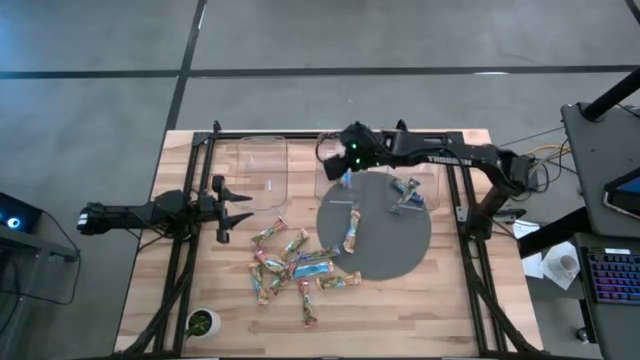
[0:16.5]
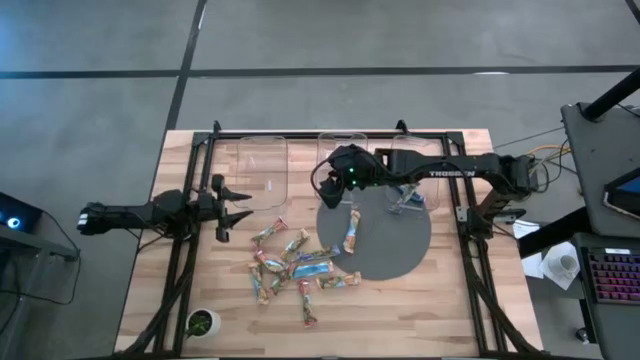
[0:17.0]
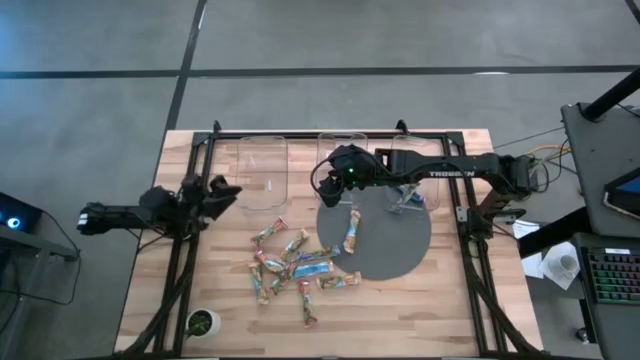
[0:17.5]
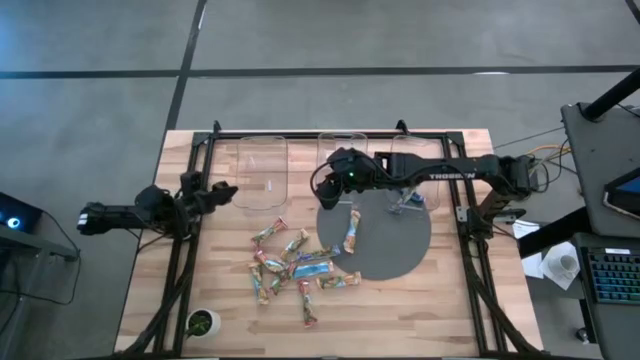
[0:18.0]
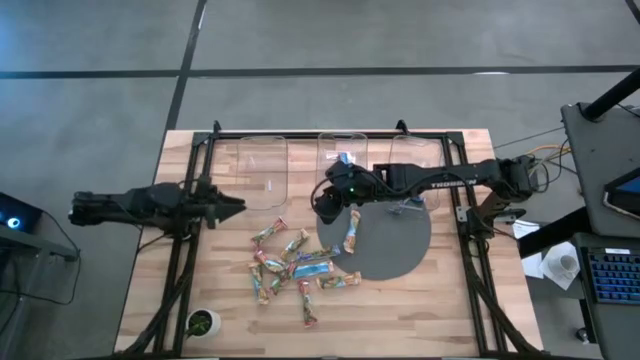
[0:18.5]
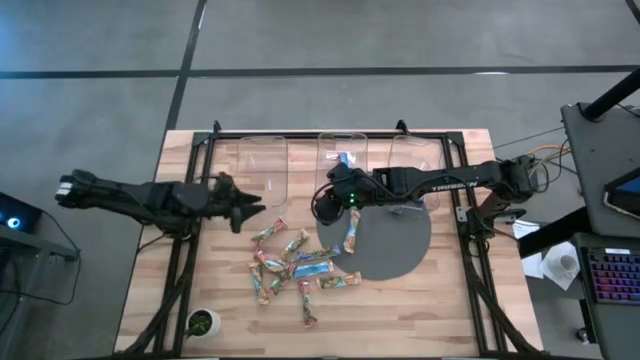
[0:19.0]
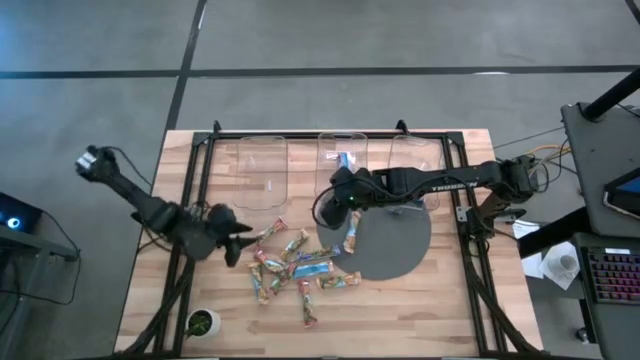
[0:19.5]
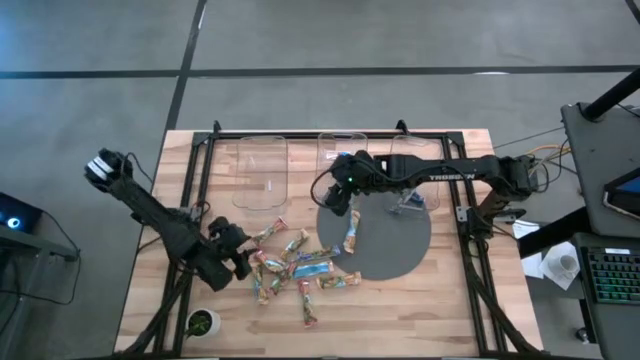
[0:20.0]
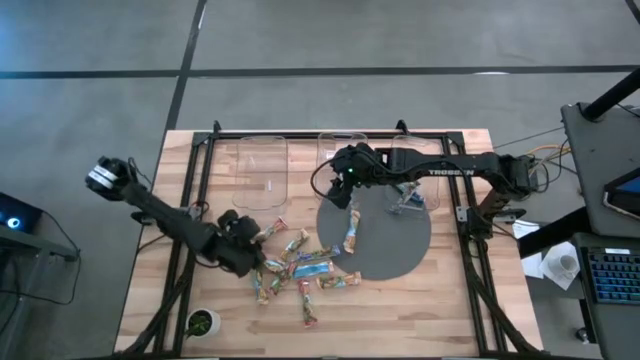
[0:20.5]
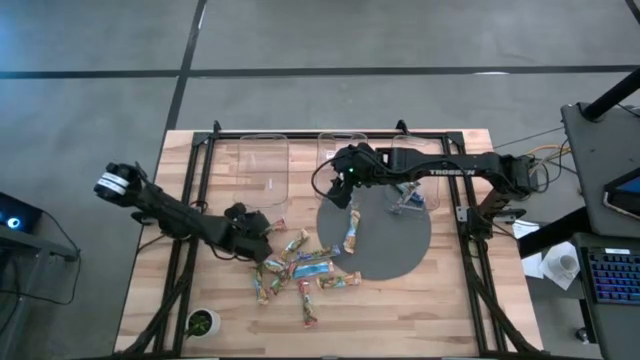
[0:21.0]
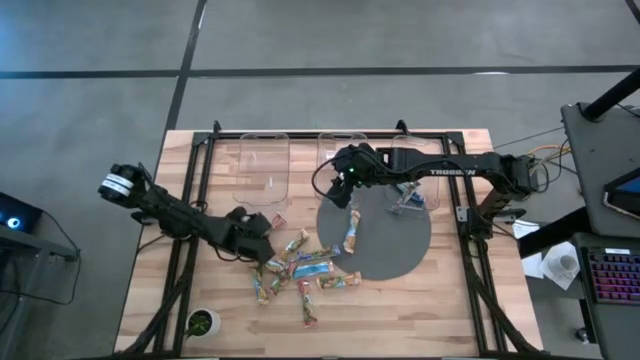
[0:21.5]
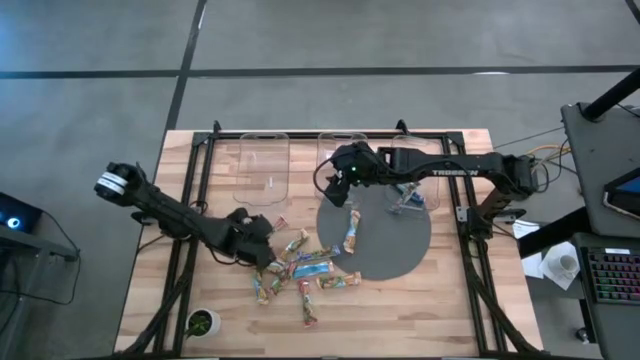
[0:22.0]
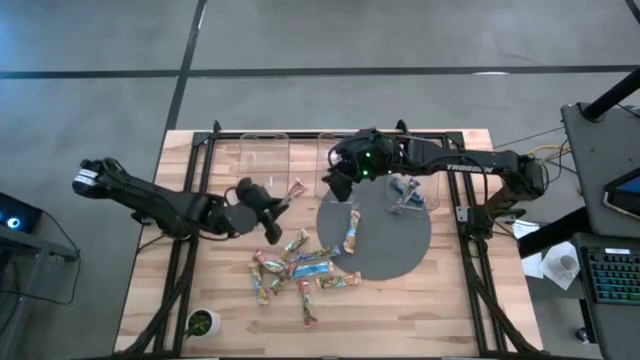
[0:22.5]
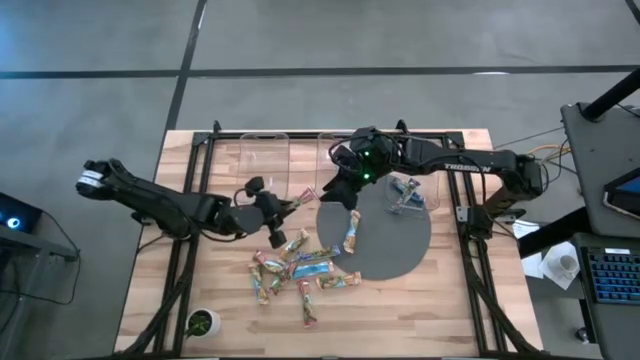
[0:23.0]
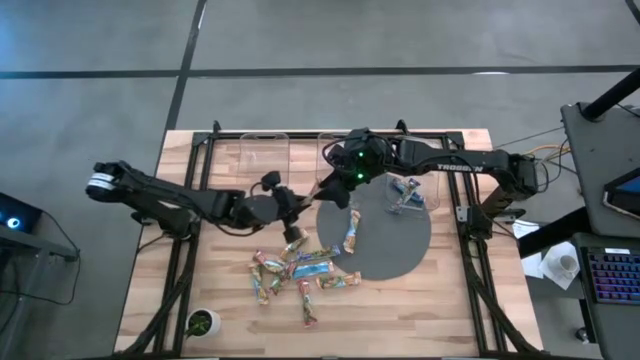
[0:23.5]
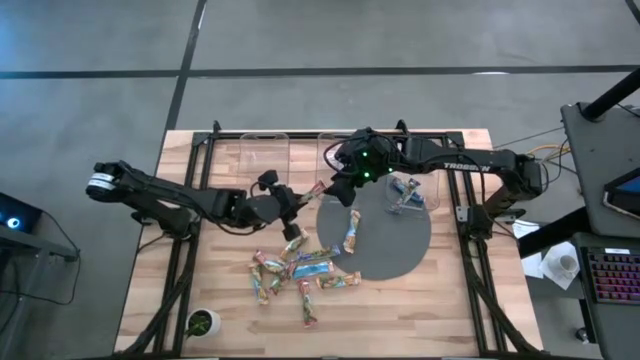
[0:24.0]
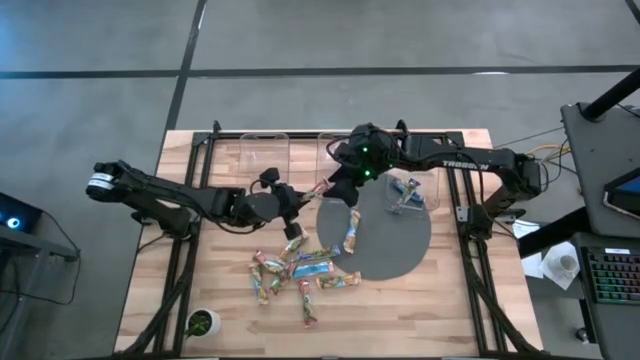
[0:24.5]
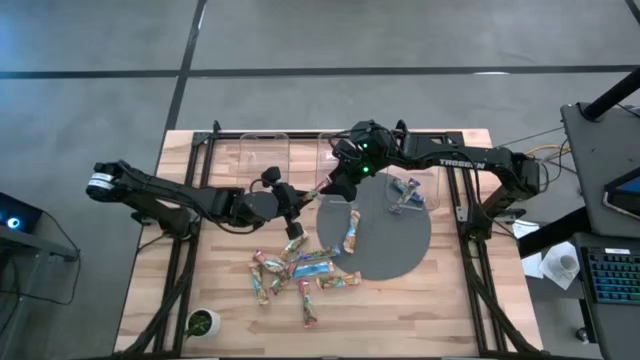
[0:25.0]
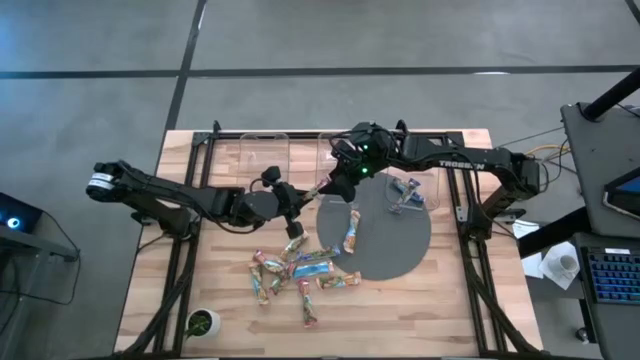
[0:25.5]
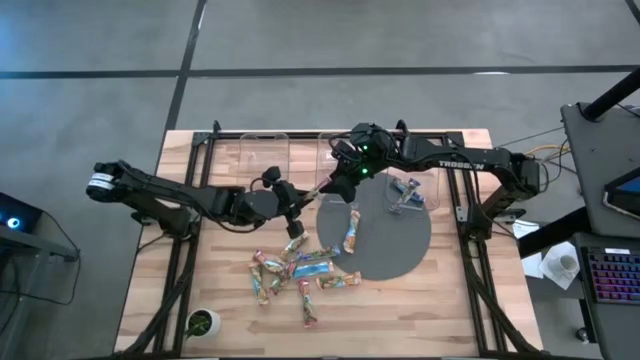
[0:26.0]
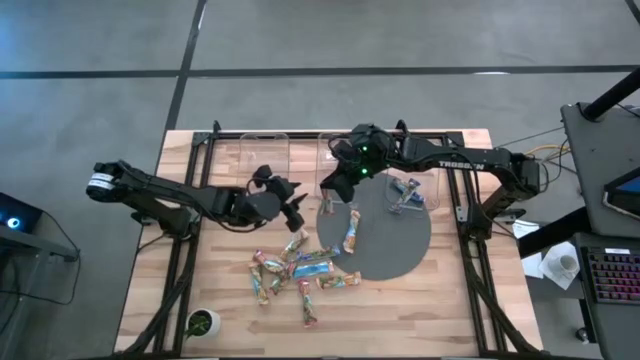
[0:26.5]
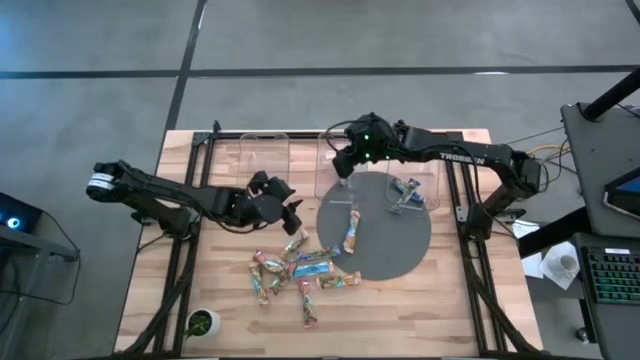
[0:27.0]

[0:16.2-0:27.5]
Task: Pick and place Granola Bars by type
Put the red granola bar into the middle transparent bin

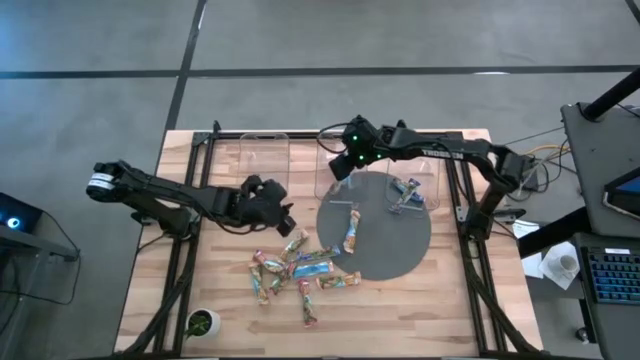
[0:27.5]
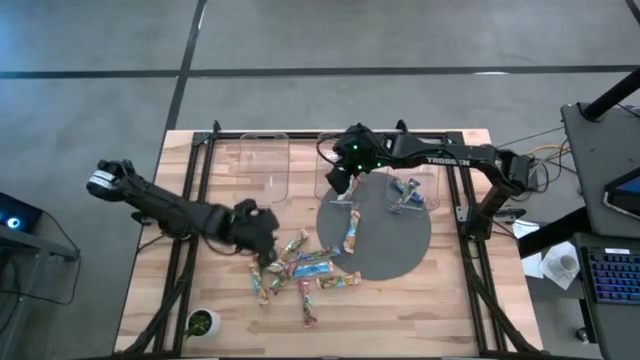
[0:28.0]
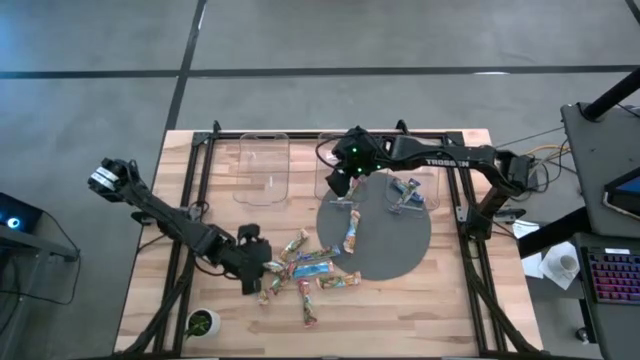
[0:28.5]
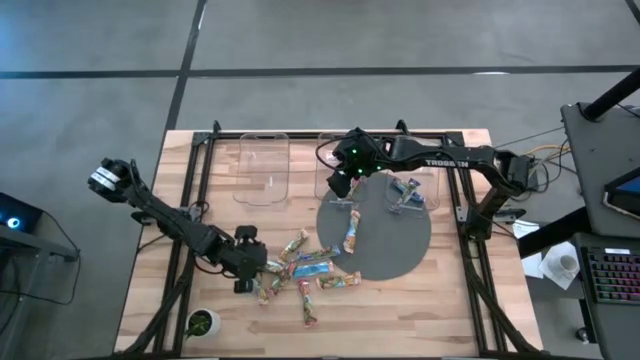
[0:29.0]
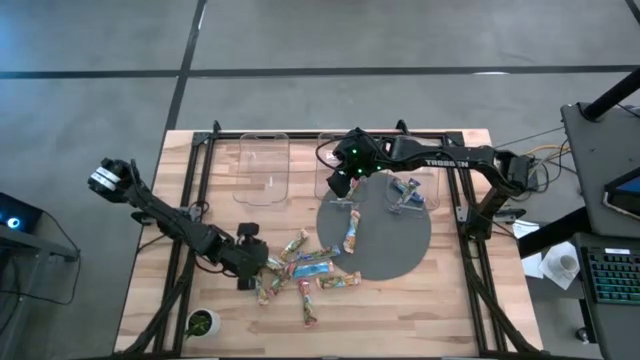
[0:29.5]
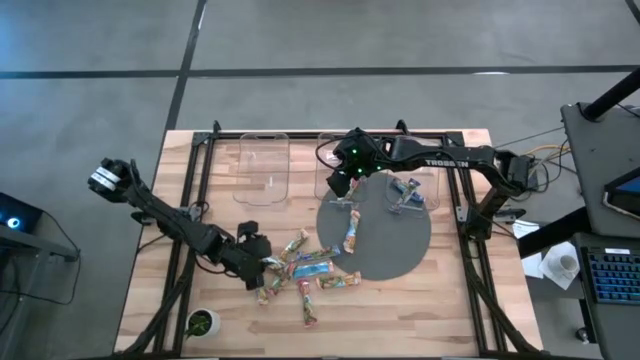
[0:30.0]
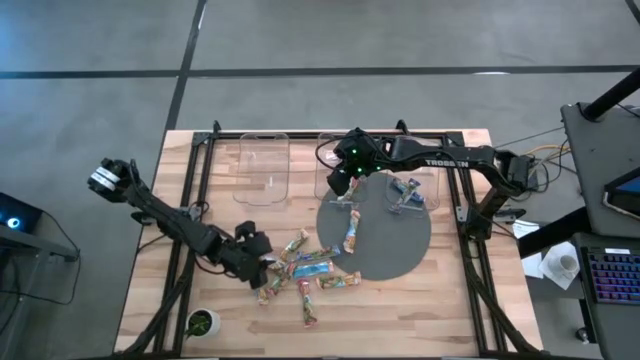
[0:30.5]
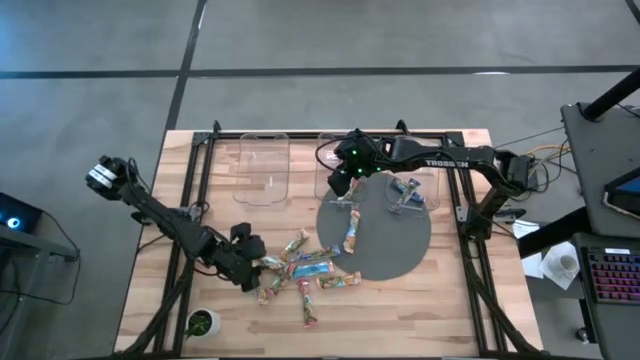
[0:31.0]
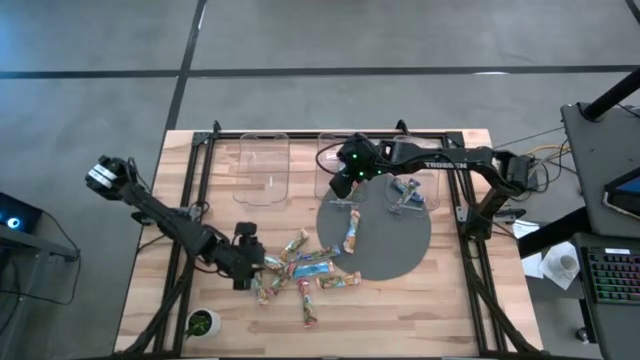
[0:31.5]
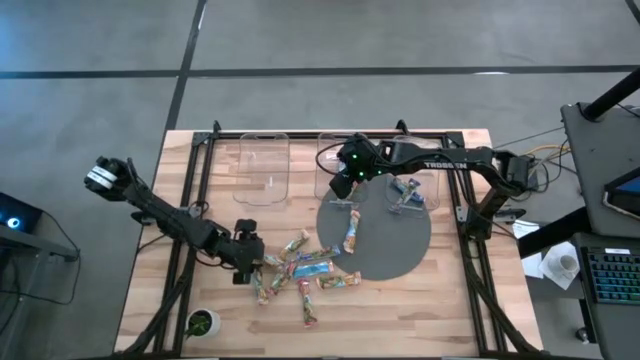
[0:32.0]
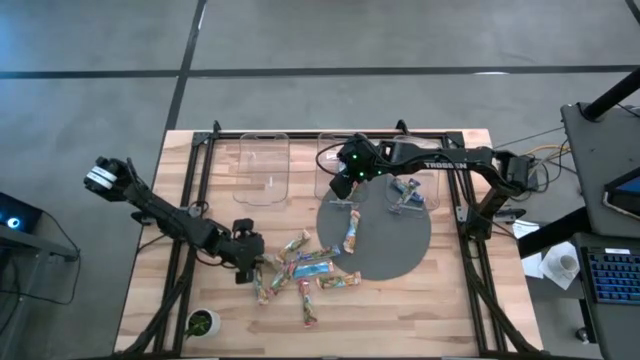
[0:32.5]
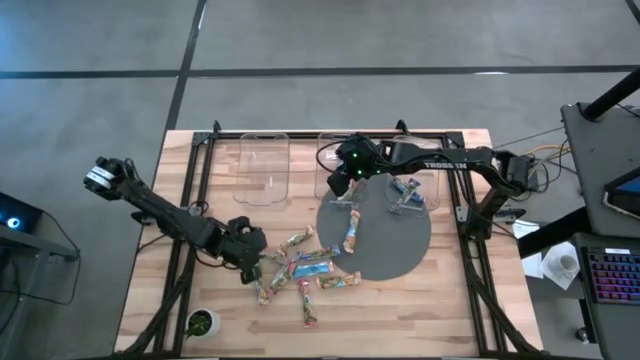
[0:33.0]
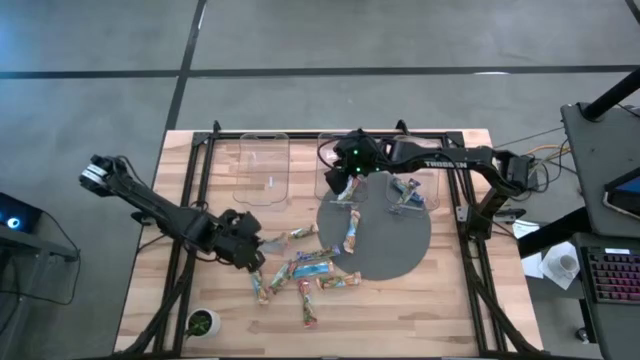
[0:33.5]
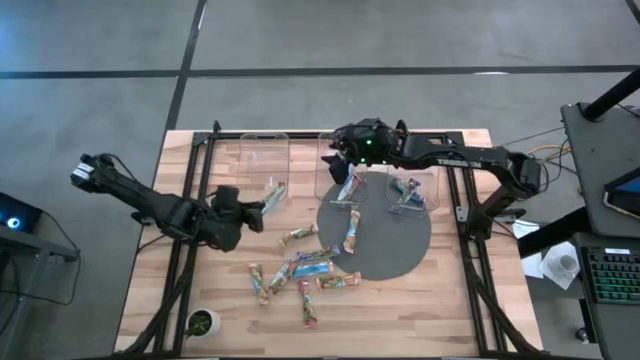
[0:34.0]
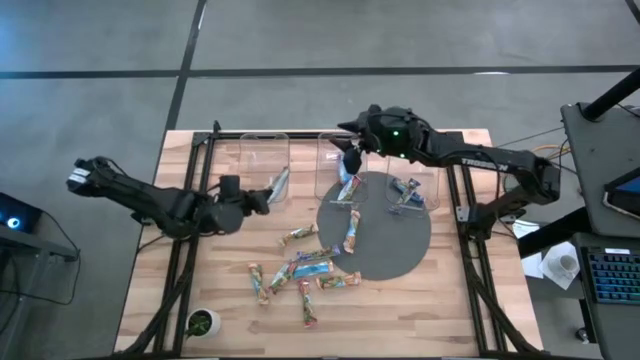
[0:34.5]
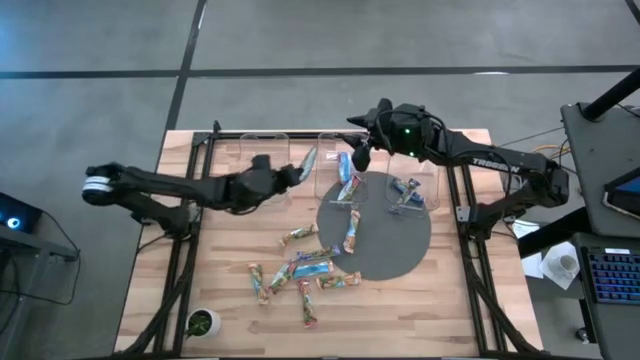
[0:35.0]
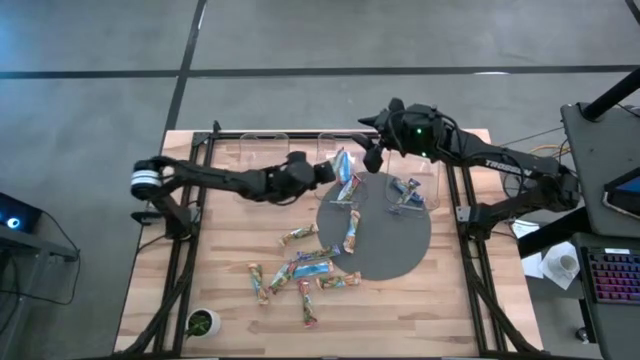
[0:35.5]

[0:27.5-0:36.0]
Put the red granola bar into the middle transparent bin

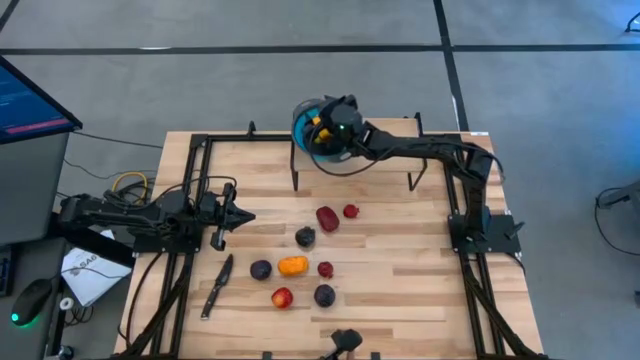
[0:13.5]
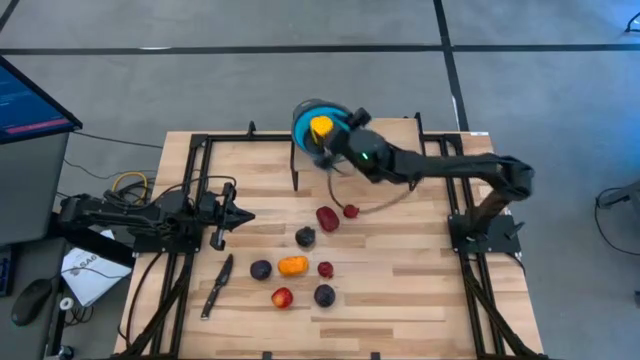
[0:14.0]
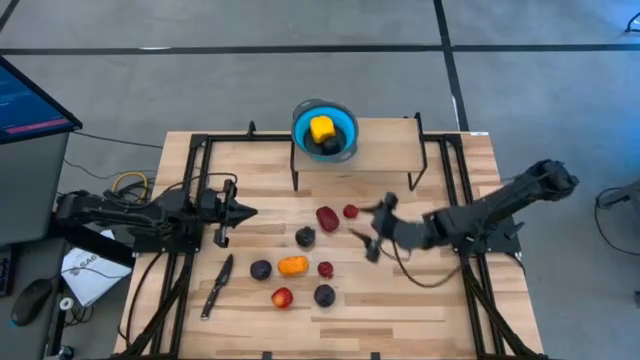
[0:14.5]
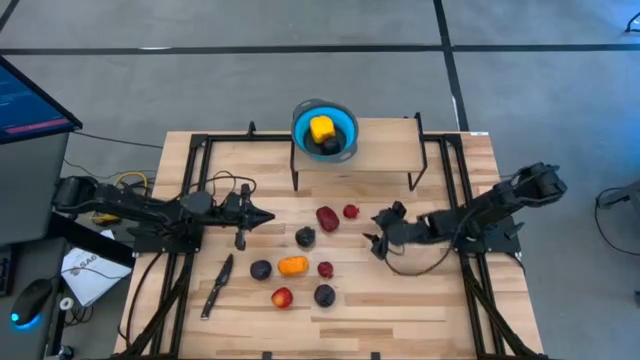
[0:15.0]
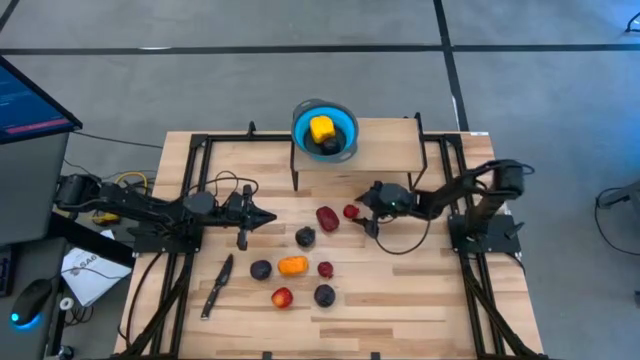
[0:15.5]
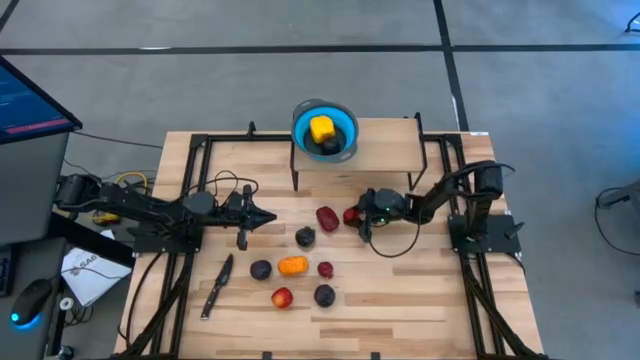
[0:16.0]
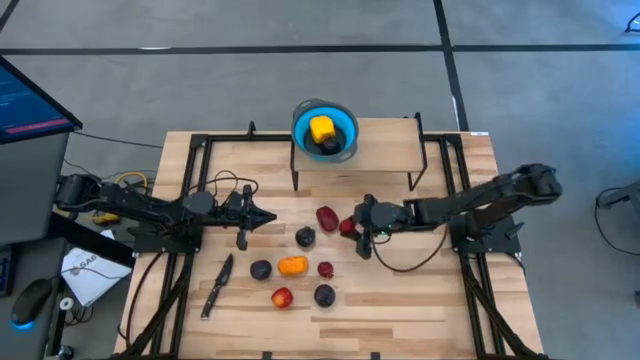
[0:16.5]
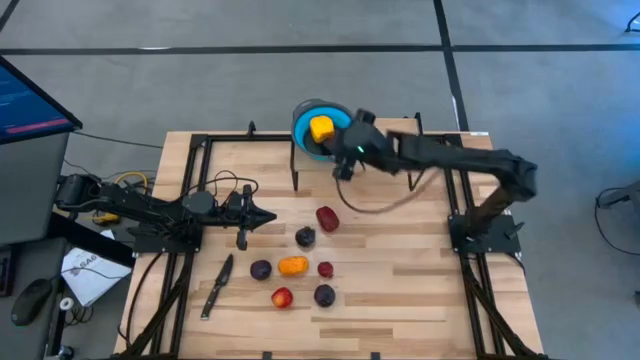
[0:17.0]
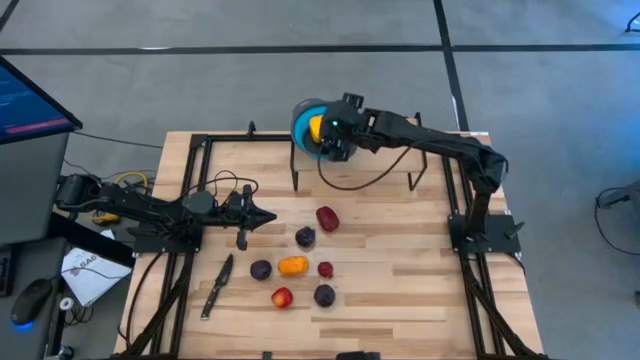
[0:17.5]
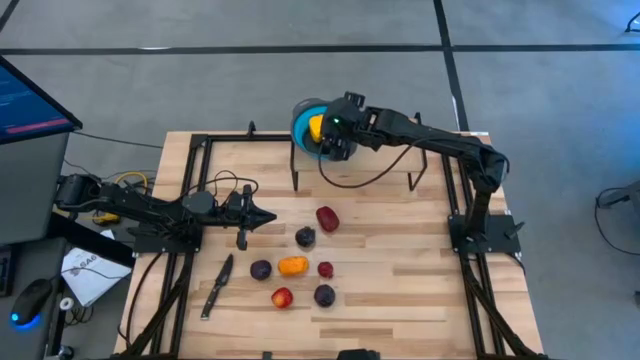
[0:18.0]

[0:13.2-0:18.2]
Task: Pick & Place Fruit
Put the top red pomegranate into the blue strainer bowl on the shelf
